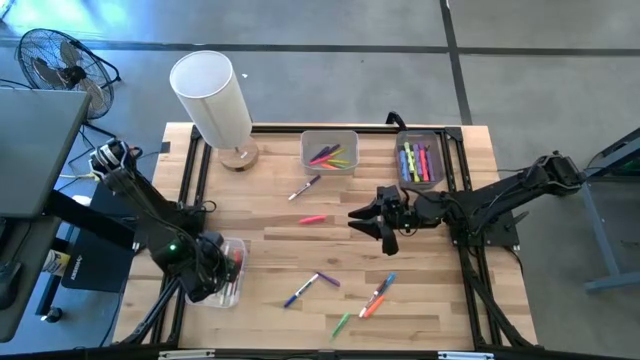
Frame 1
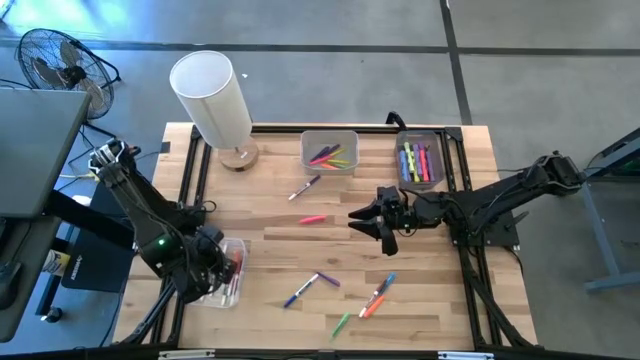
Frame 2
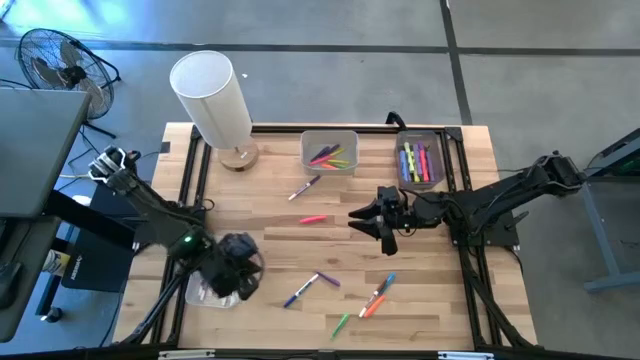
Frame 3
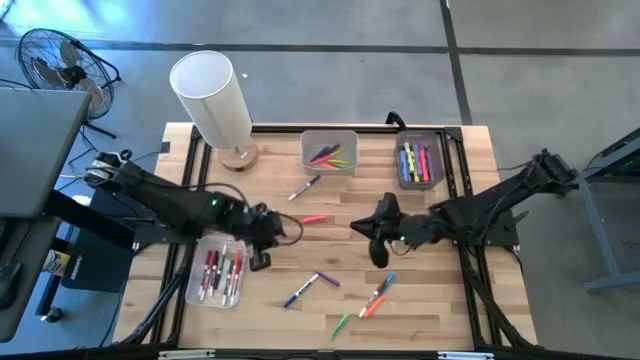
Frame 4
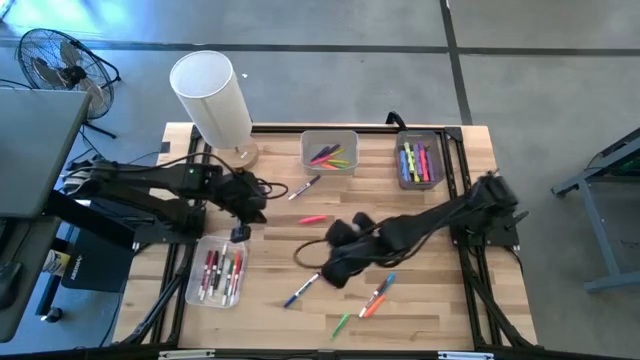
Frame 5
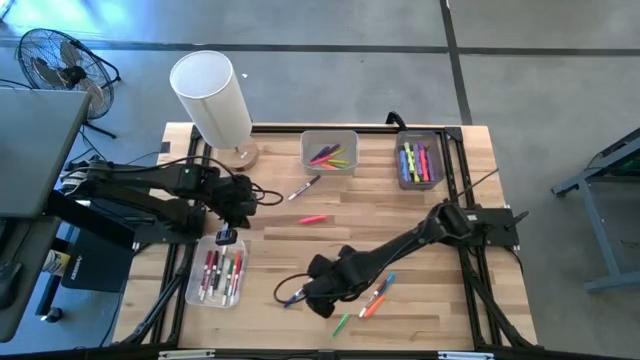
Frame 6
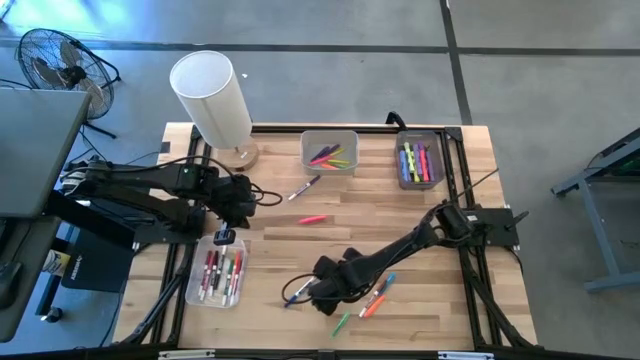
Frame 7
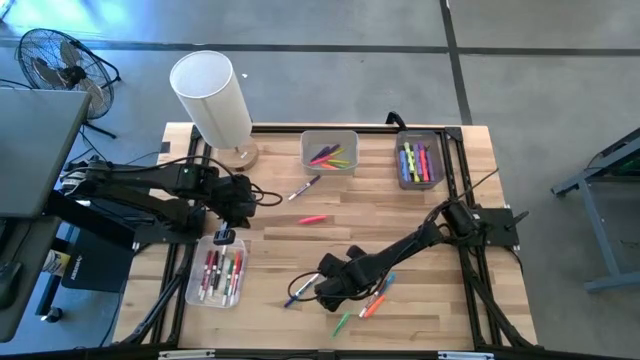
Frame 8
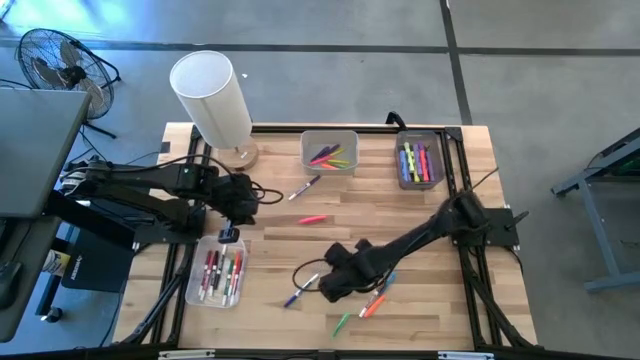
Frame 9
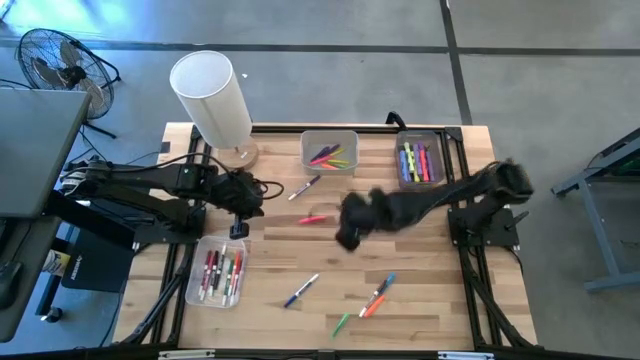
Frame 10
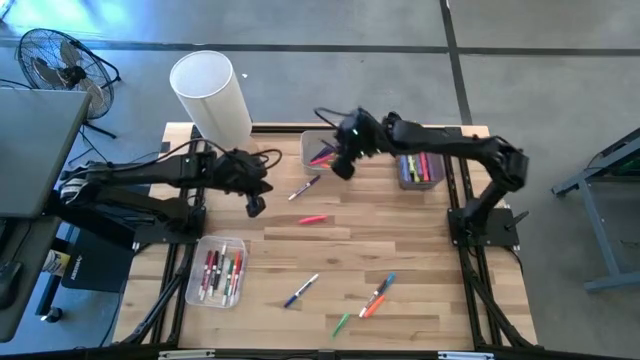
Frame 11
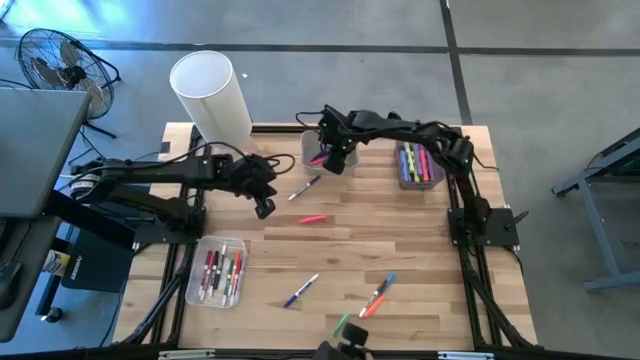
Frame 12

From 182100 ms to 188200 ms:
Task: Pick & Place Markers
Put the blue pen into the white bin

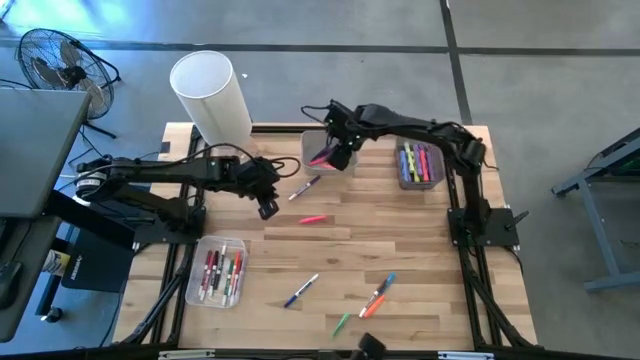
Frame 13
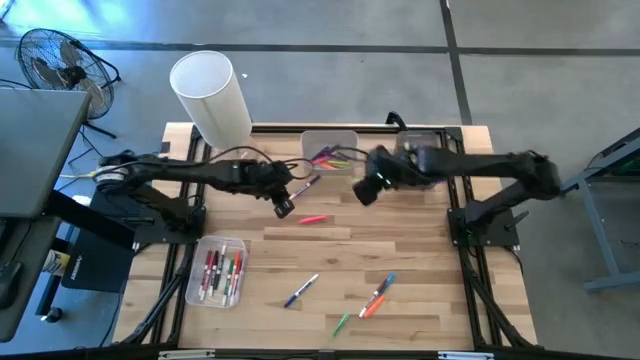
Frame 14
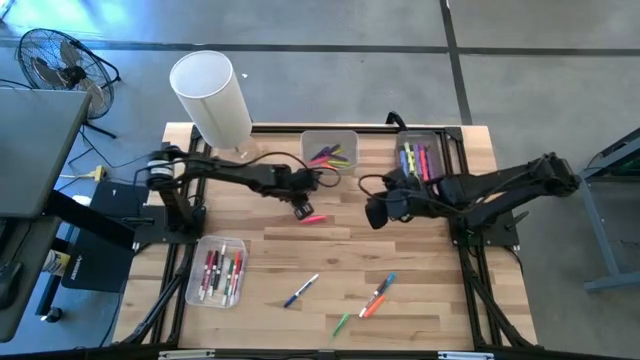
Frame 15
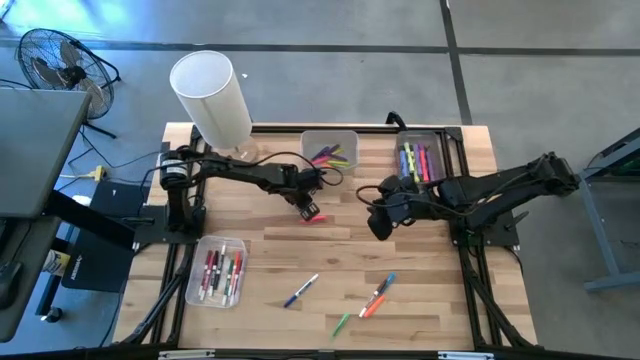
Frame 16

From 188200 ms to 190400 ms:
Put the blue marker into the transparent bin

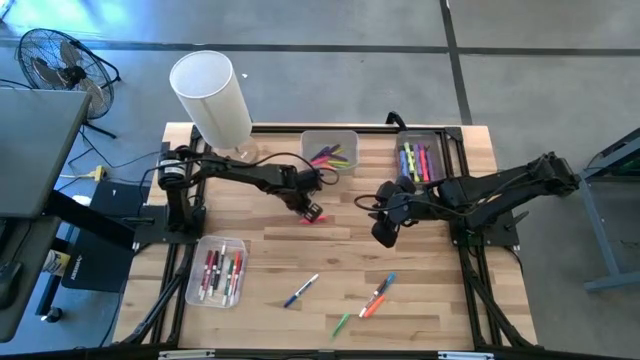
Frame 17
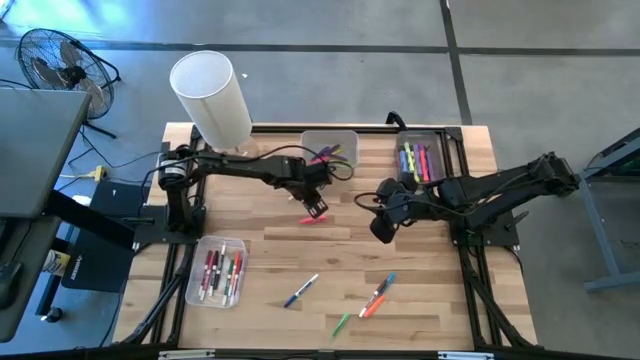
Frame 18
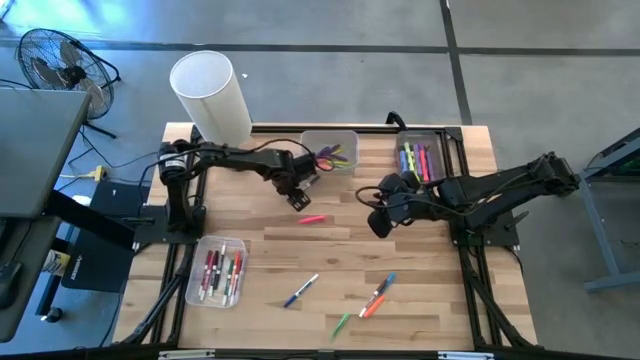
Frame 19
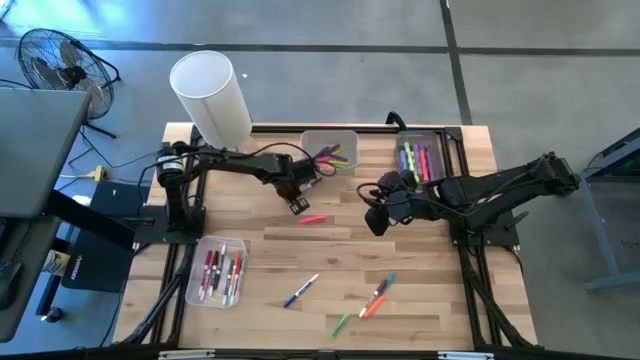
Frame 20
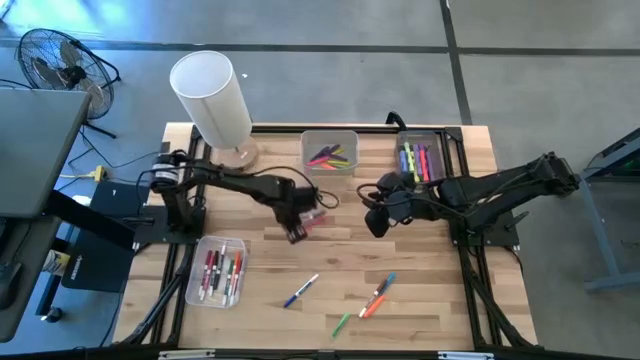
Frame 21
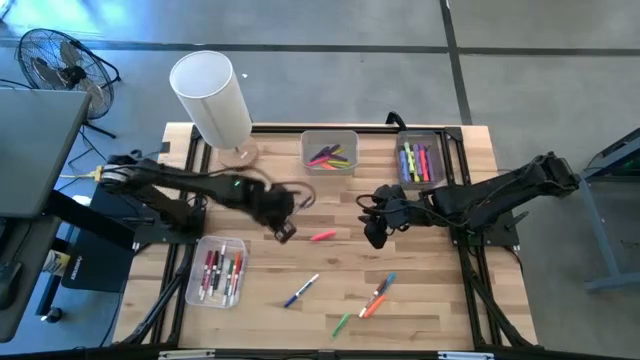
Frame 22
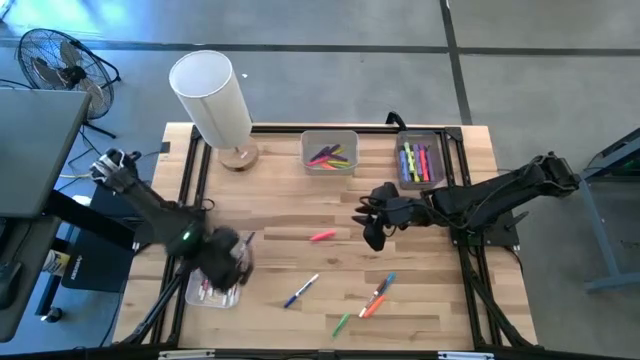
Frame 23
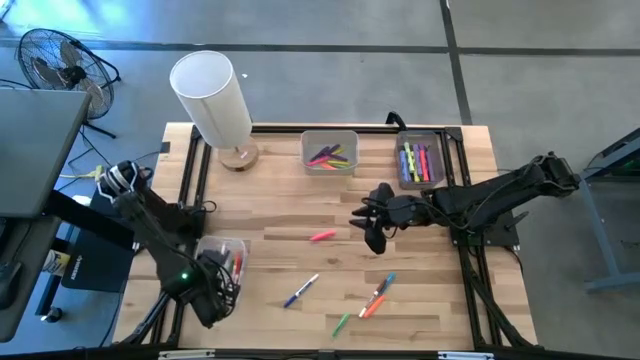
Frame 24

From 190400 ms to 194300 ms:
Put the blue marker into the transparent bin

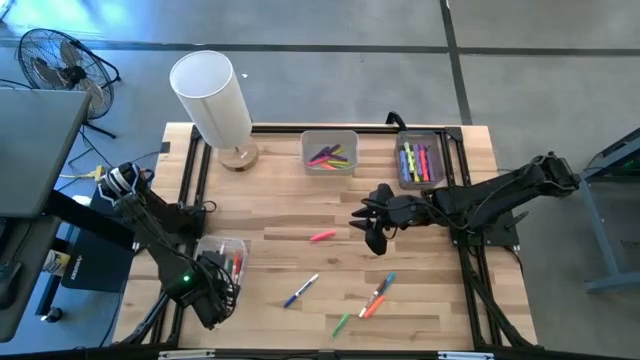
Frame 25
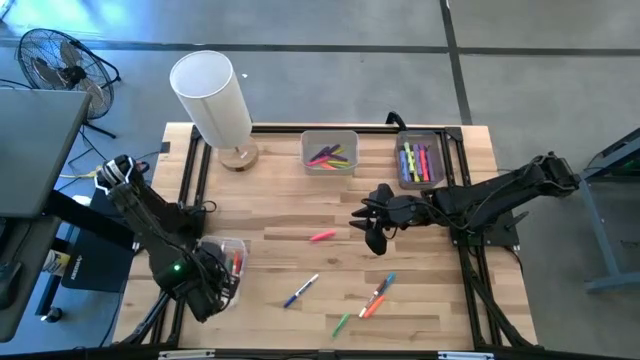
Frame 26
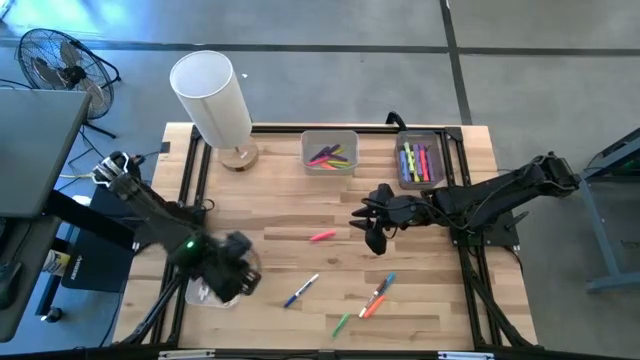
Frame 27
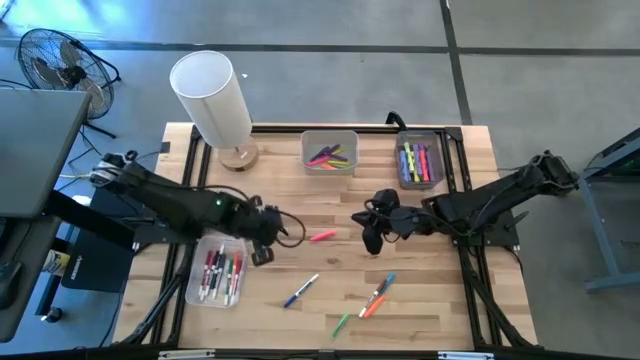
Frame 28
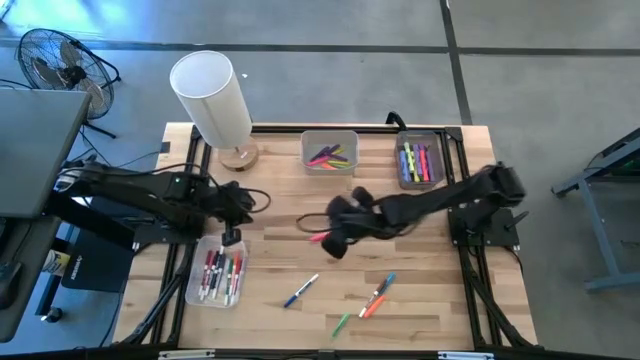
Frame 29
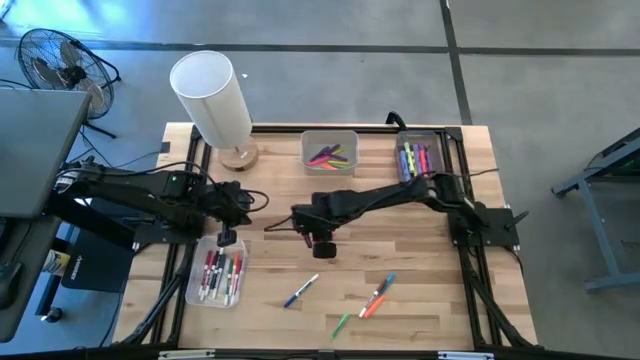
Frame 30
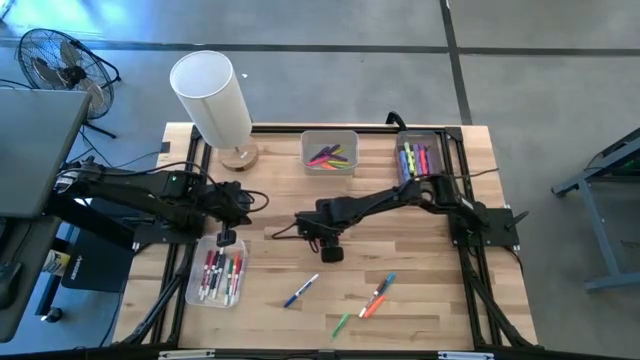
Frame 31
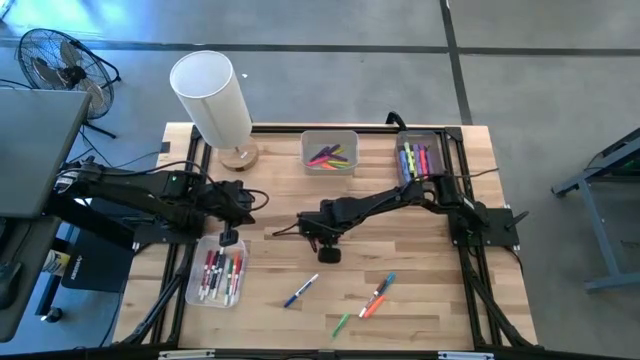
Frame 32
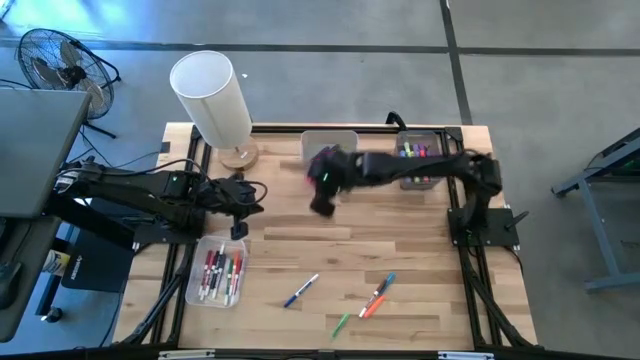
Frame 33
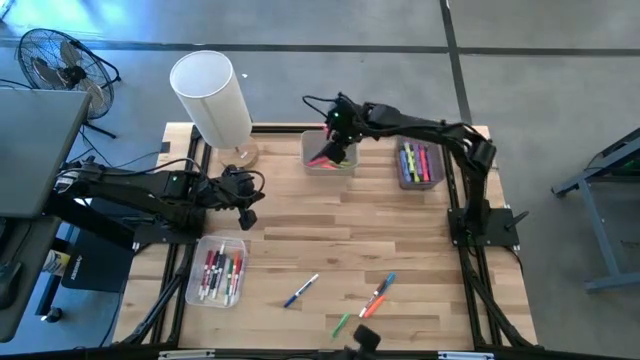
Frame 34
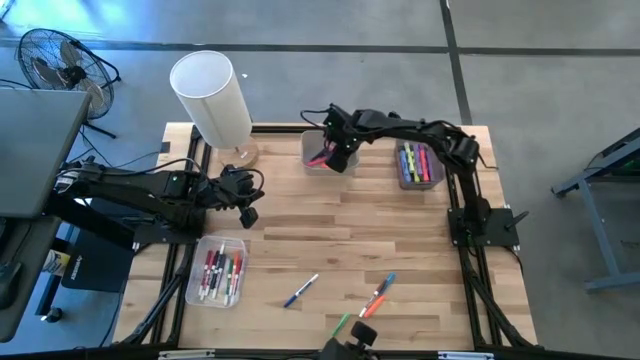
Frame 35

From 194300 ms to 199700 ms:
Put the pink pen into the white bin

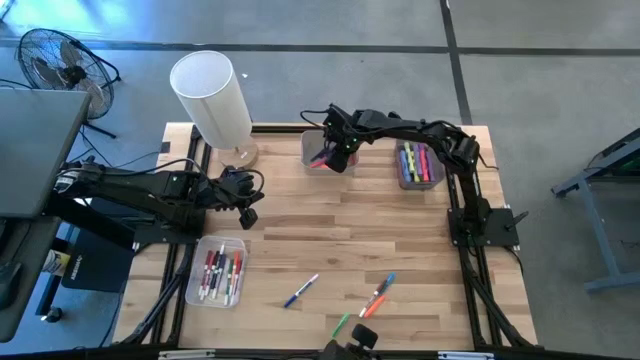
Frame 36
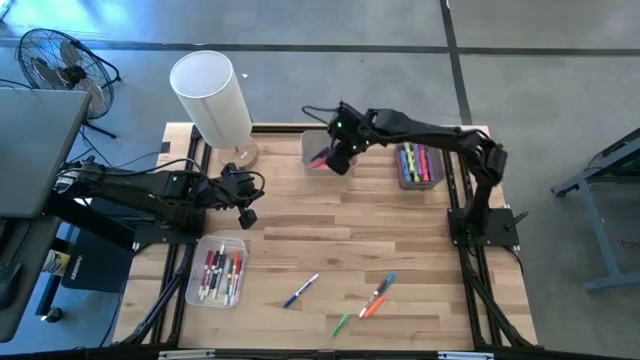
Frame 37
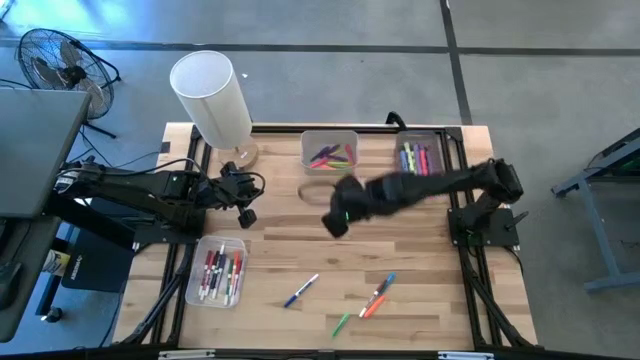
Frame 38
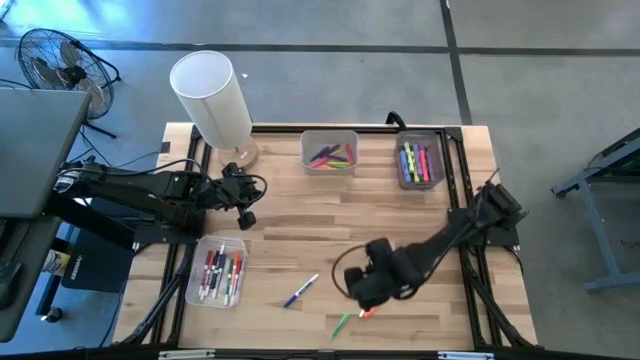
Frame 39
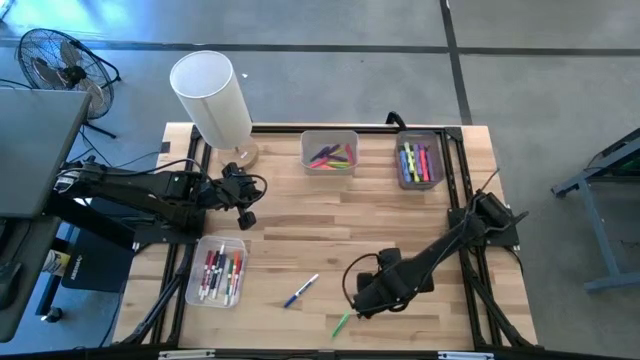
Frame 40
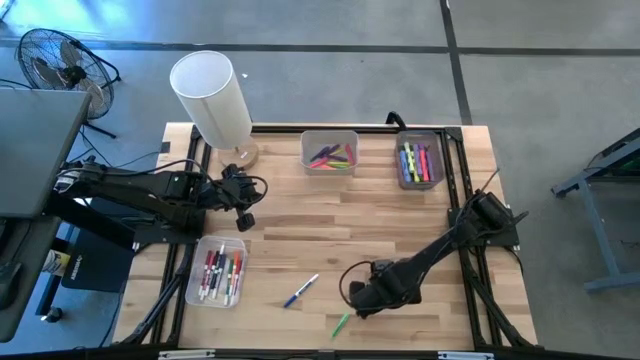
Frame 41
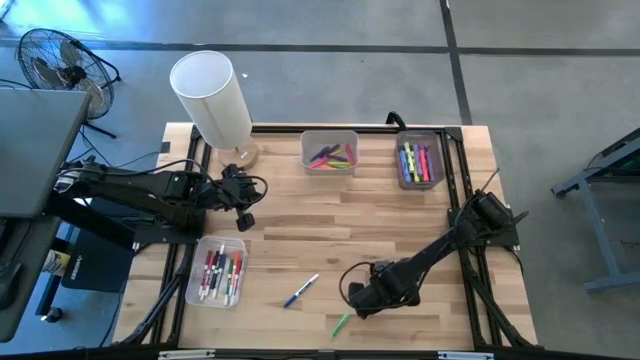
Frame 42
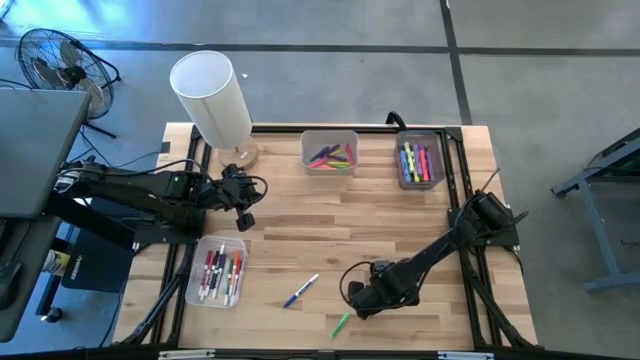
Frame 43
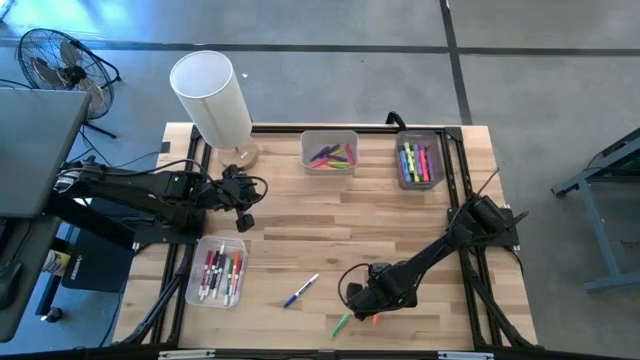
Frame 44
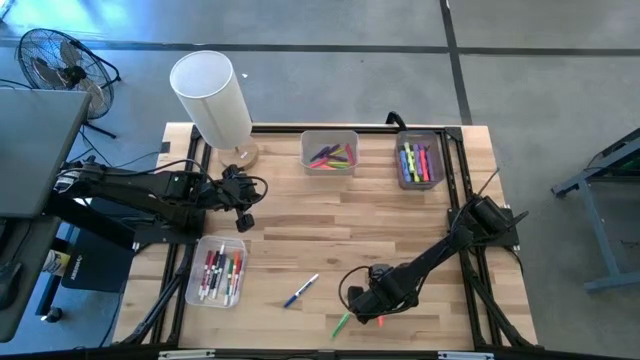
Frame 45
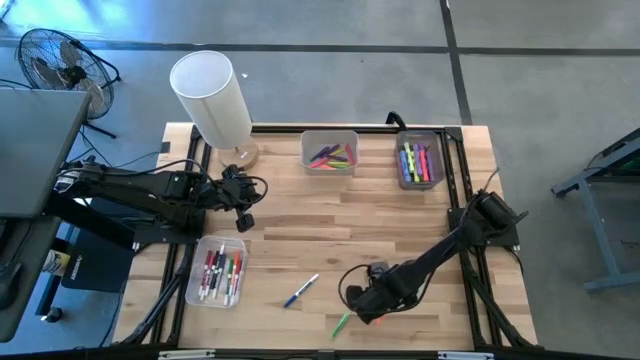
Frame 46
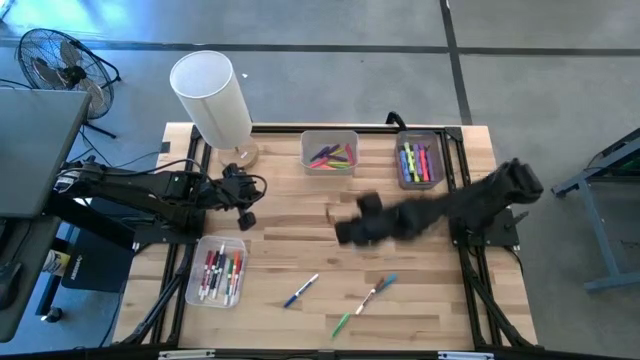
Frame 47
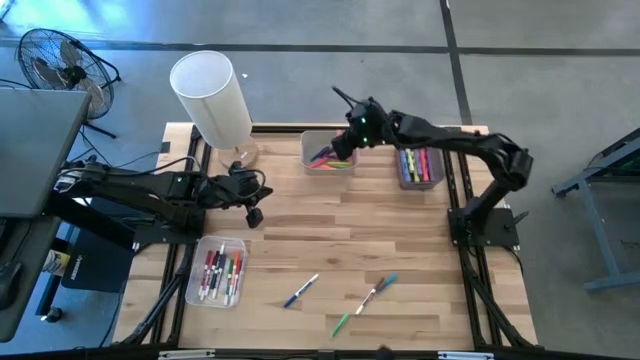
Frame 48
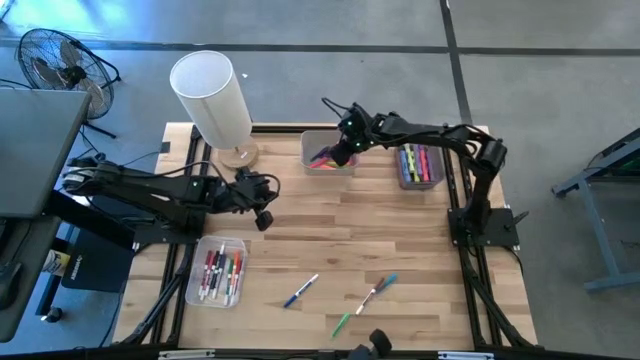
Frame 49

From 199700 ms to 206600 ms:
Put the orange pen into the white bin
